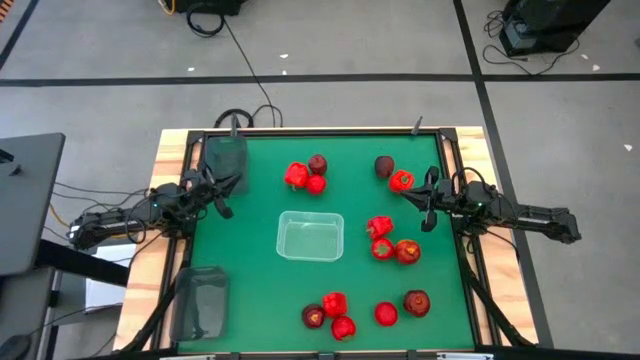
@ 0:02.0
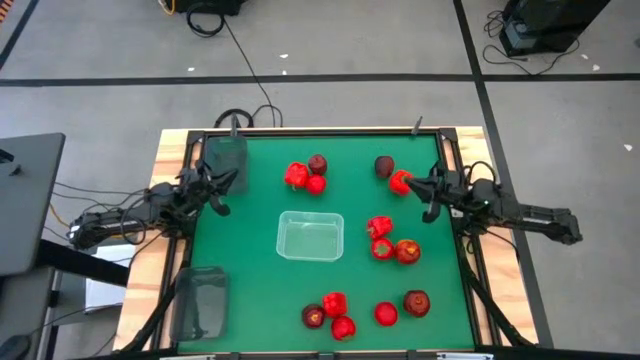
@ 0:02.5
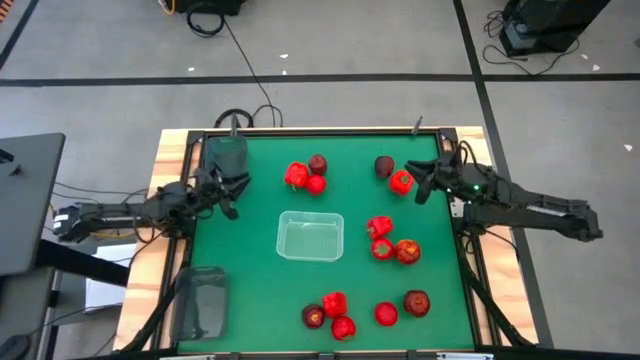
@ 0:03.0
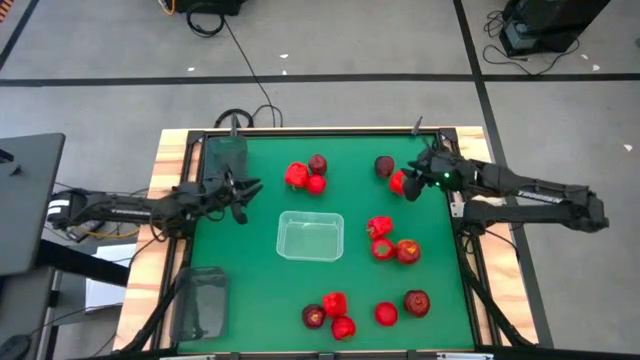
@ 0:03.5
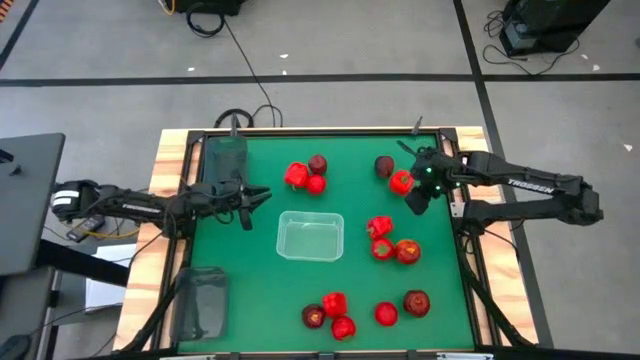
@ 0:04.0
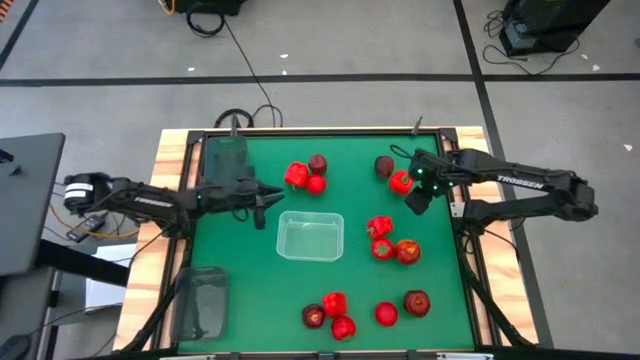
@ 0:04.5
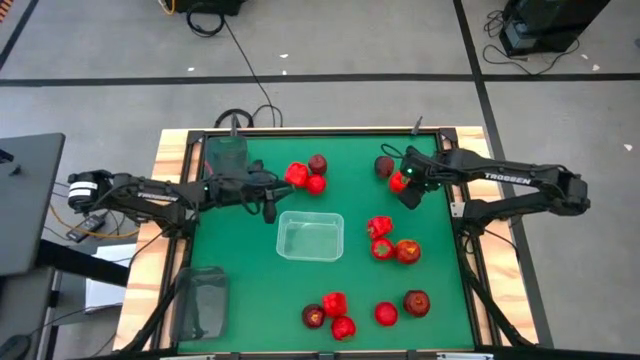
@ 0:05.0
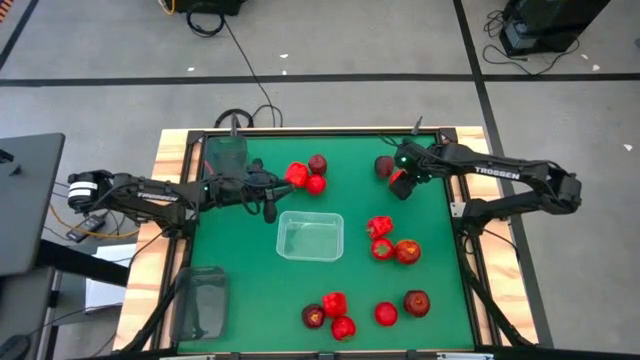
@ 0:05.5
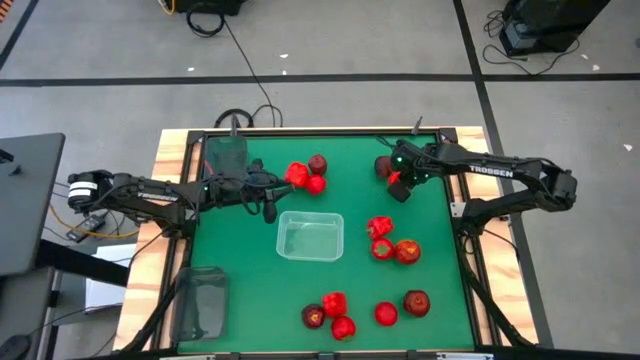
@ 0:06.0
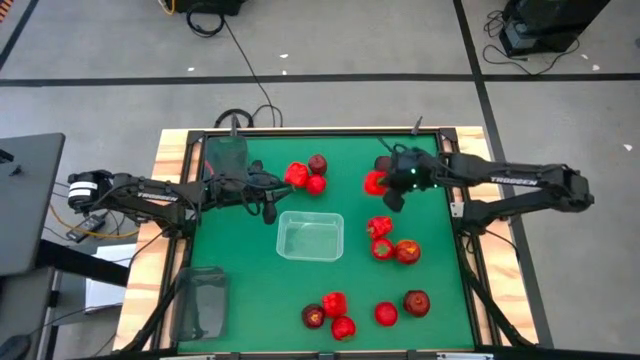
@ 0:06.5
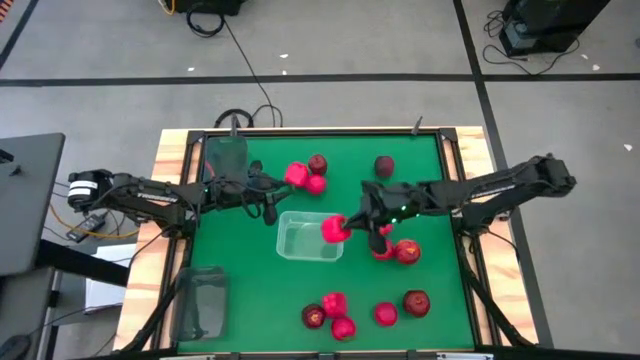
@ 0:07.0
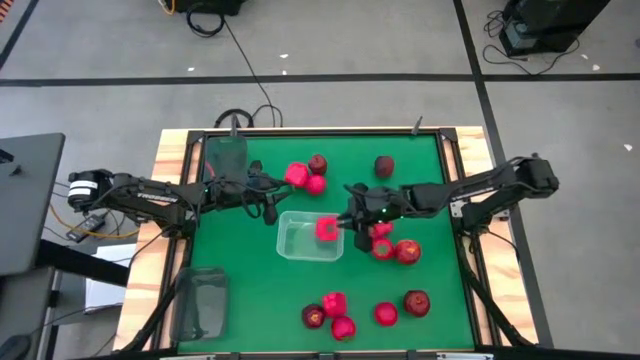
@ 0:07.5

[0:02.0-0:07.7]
Task: Sort produce into baskets
Put the red bell pepper into the transparent bin

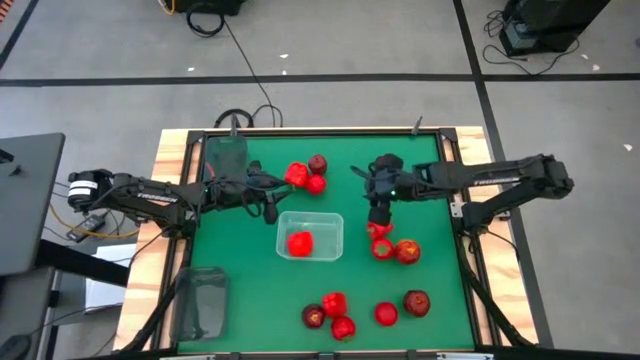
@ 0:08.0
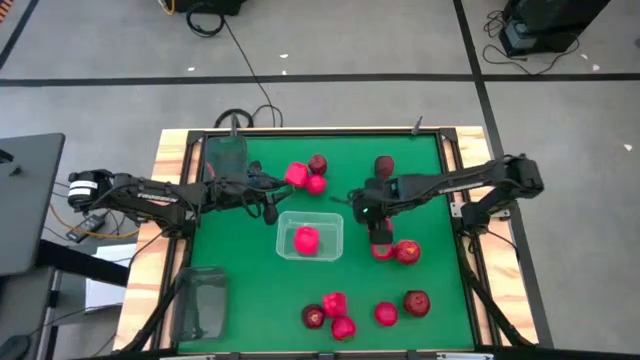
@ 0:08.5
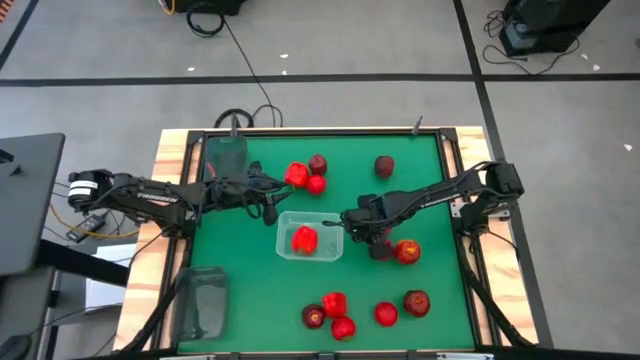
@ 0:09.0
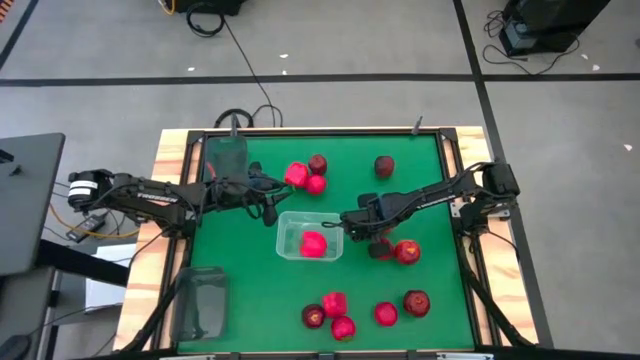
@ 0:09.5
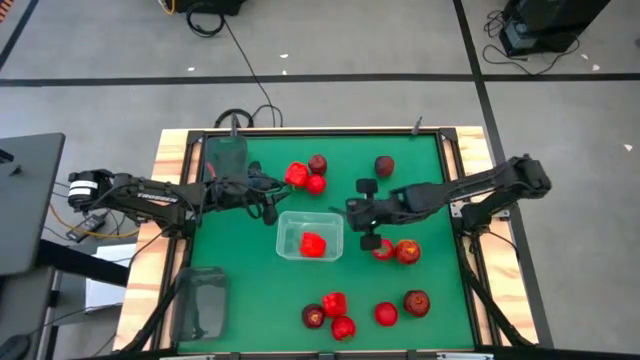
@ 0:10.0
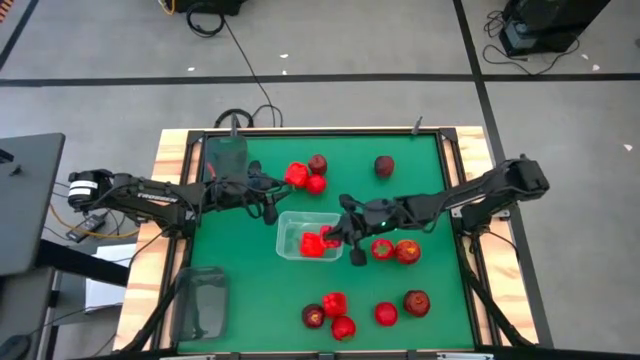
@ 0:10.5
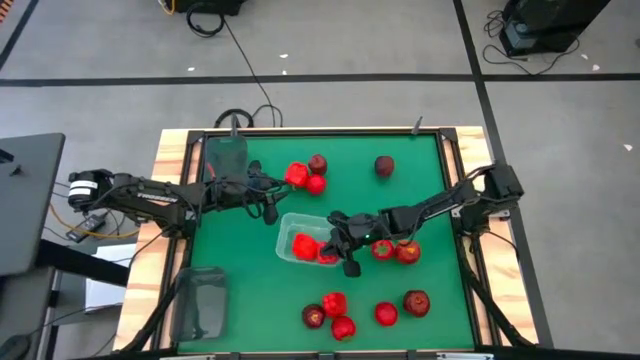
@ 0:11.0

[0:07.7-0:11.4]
Put the red bell pepper into the transparent bin

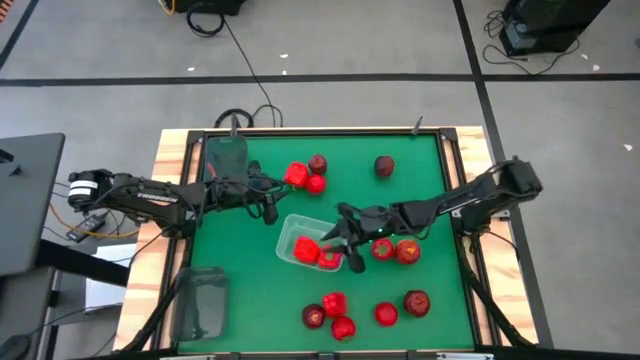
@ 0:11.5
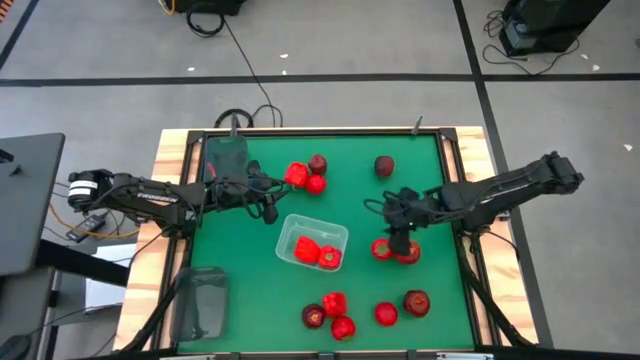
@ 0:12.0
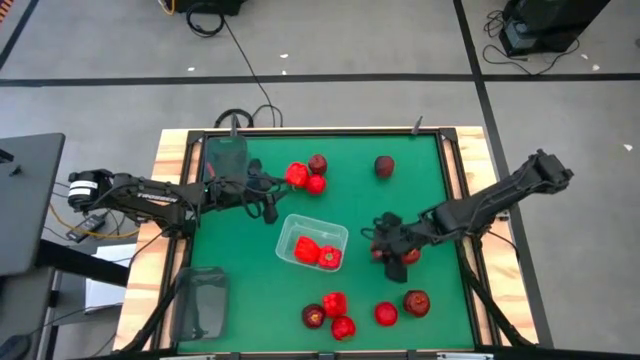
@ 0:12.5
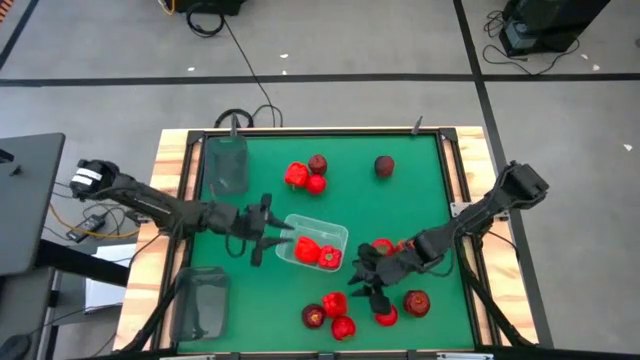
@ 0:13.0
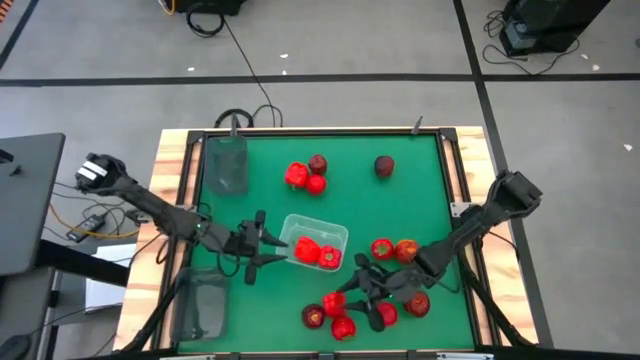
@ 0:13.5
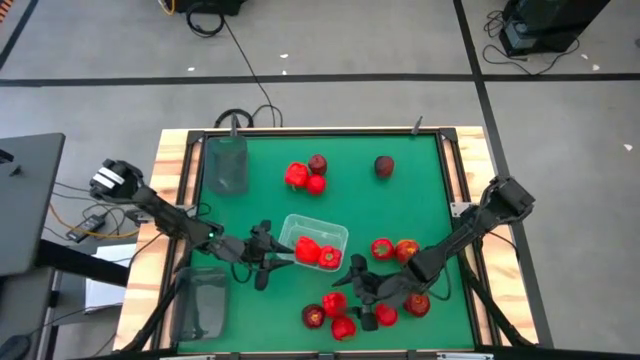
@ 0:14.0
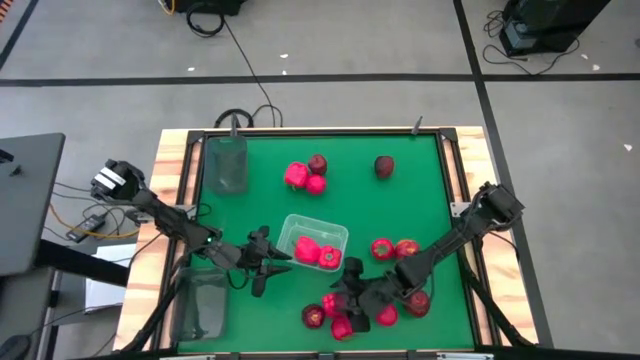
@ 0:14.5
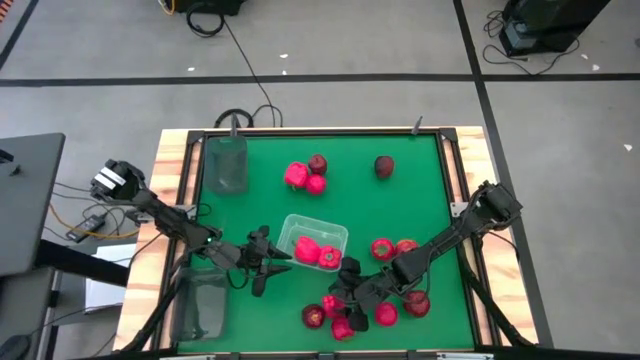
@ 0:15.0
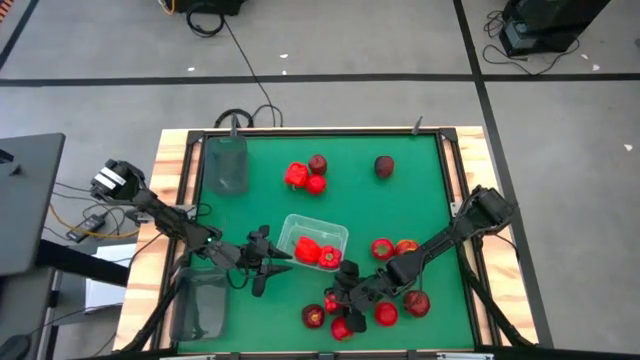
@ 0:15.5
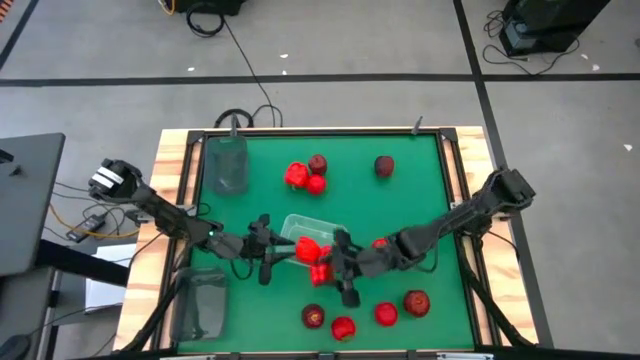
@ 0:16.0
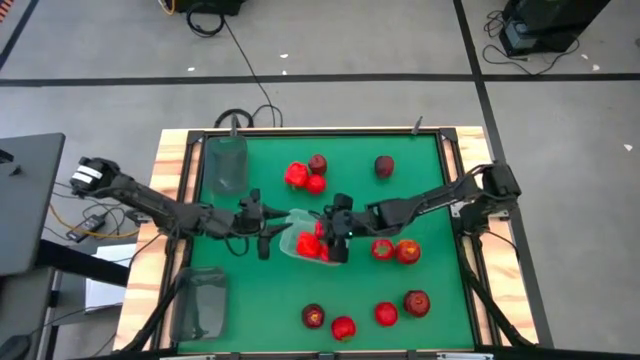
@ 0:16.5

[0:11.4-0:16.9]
Put the red bell pepper into the transparent bin

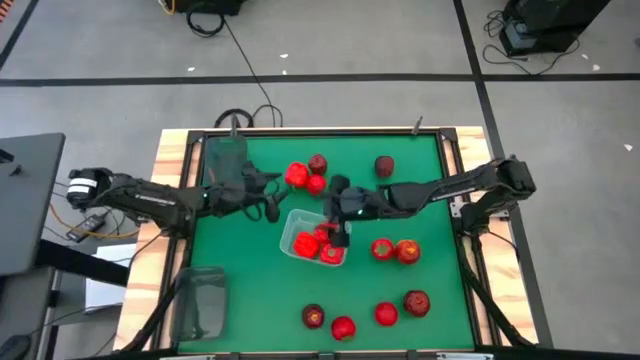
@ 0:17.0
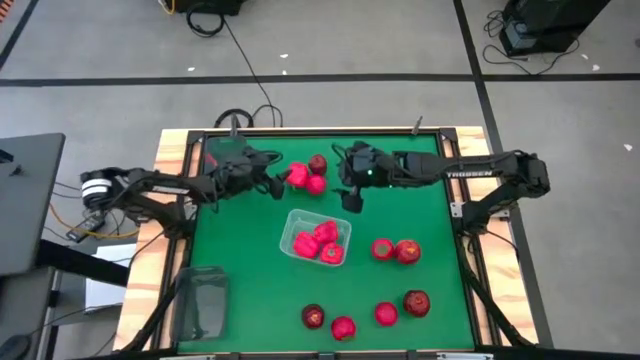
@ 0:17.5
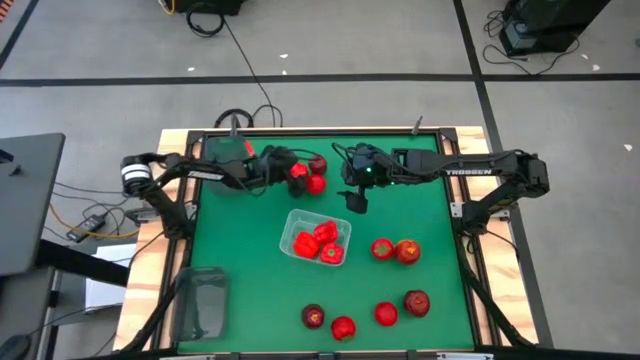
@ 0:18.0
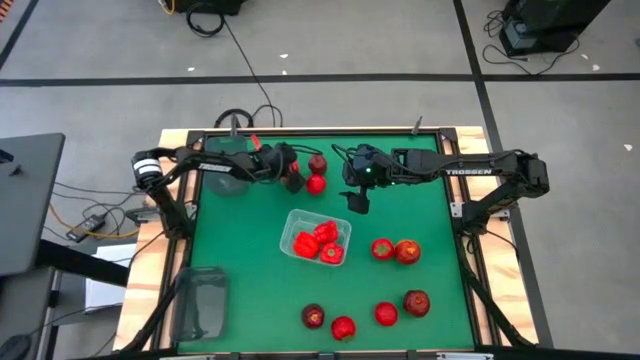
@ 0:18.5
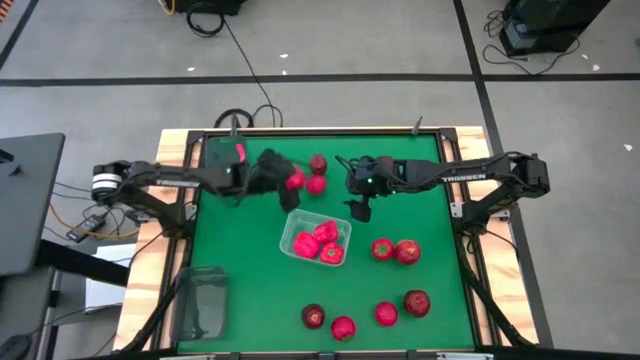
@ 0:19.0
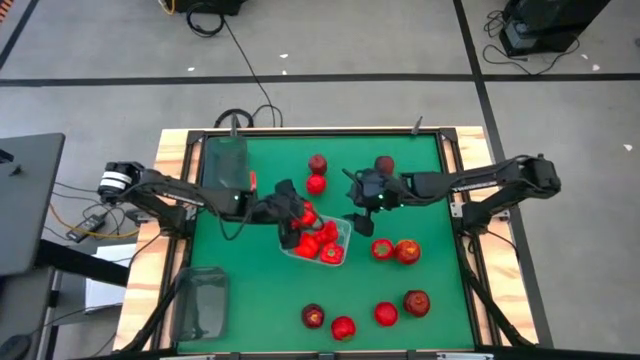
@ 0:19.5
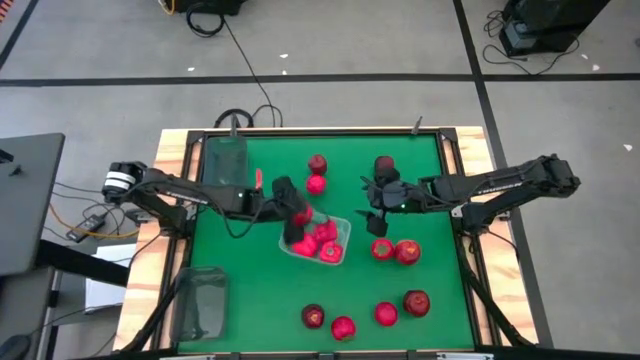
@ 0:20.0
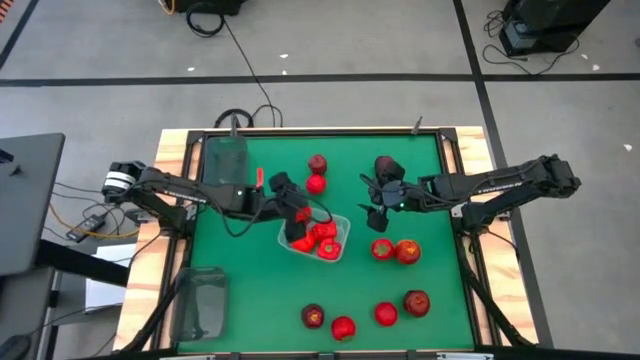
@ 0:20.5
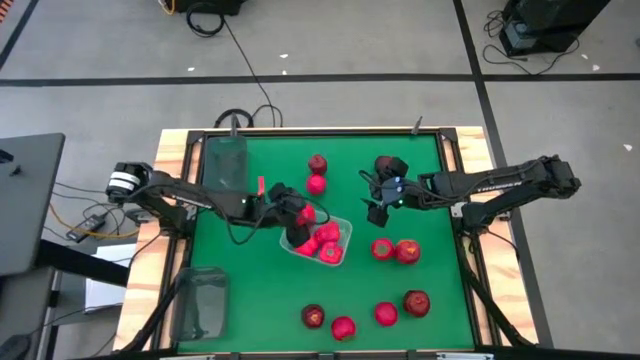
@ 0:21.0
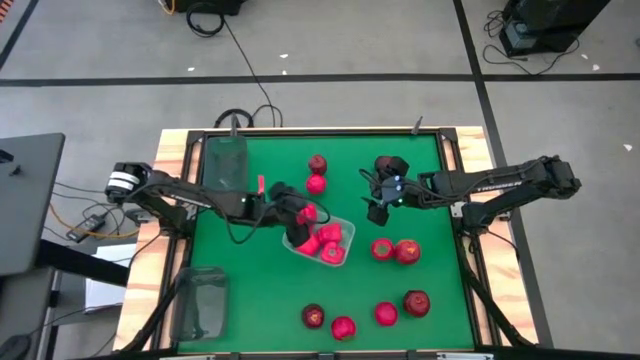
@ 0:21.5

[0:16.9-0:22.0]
Put the red bell pepper into the transparent bin

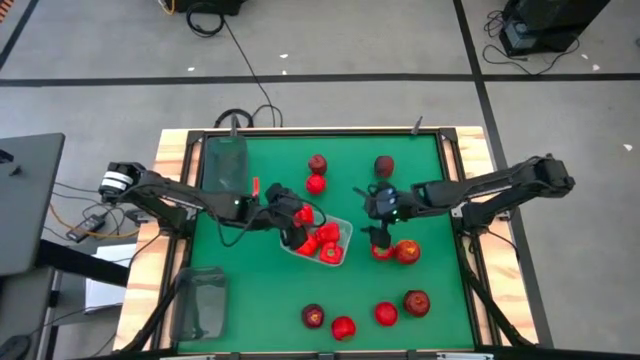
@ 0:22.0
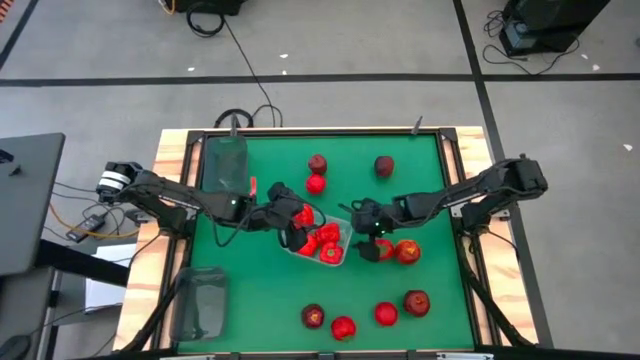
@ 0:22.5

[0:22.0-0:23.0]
Adjust the transparent bin

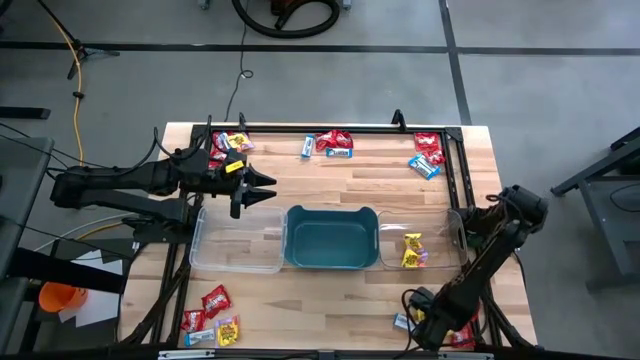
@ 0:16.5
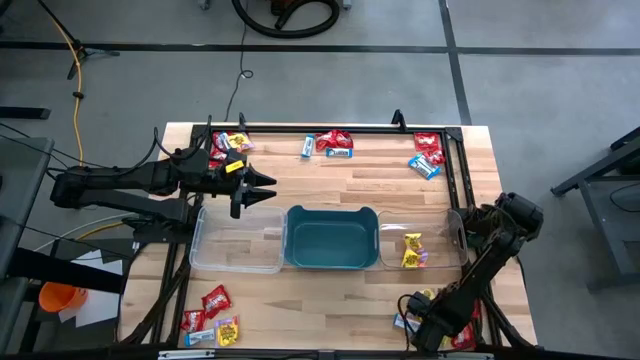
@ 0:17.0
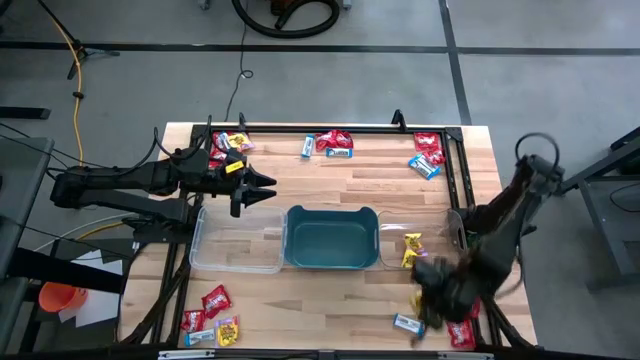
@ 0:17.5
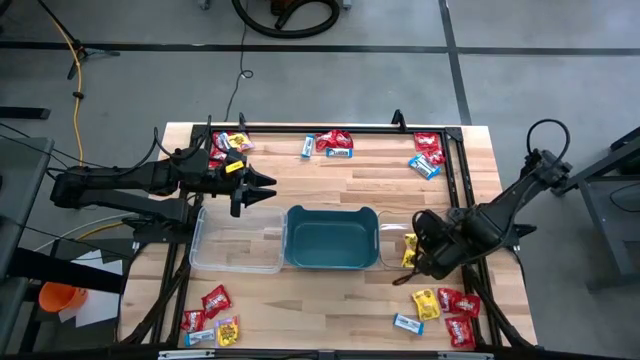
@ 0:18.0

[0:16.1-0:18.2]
Task: Sort candy
Put the yellow candy into the right transparent bin
